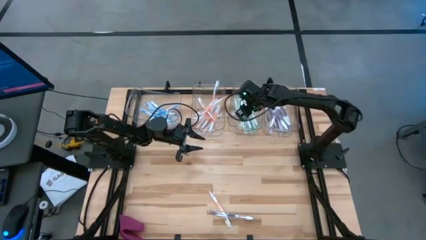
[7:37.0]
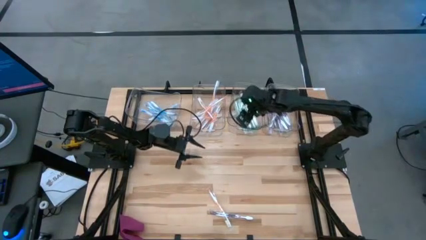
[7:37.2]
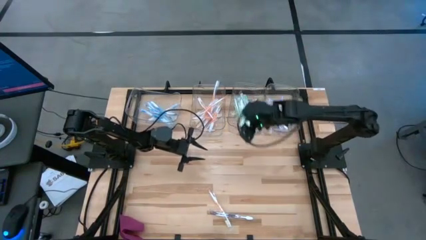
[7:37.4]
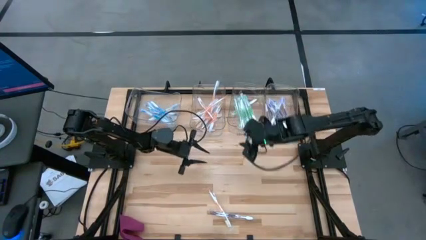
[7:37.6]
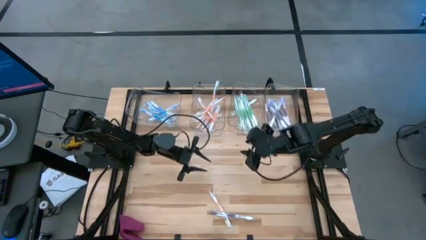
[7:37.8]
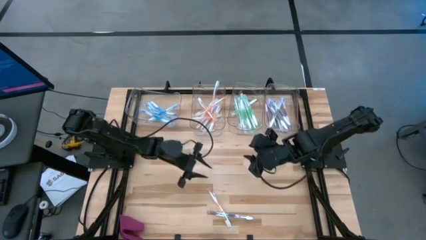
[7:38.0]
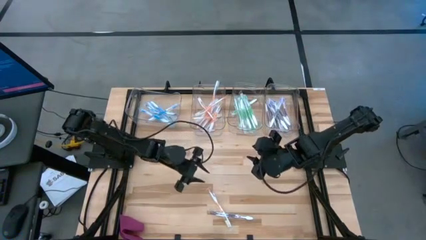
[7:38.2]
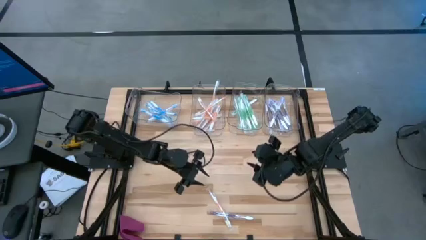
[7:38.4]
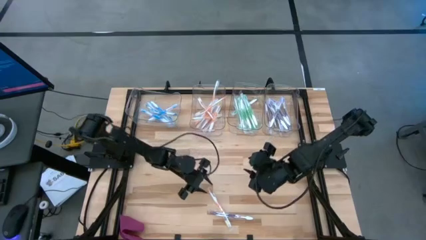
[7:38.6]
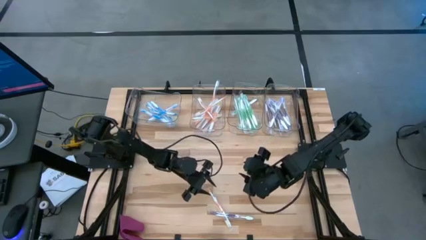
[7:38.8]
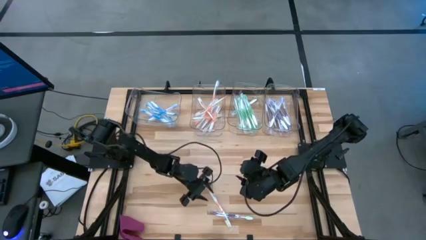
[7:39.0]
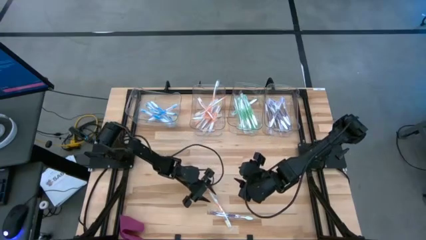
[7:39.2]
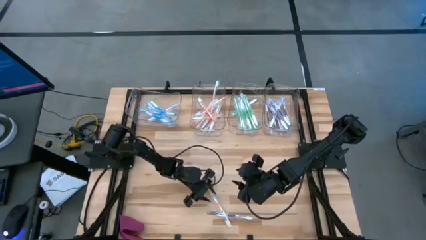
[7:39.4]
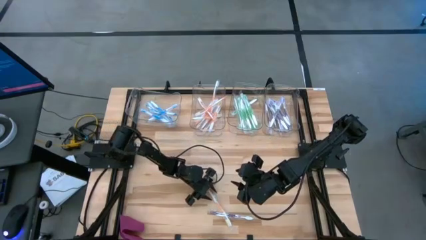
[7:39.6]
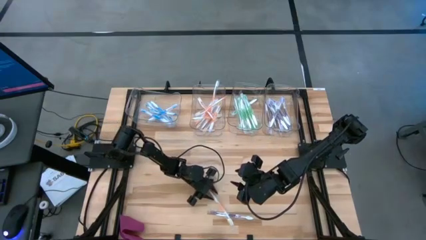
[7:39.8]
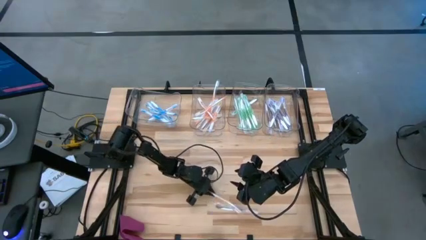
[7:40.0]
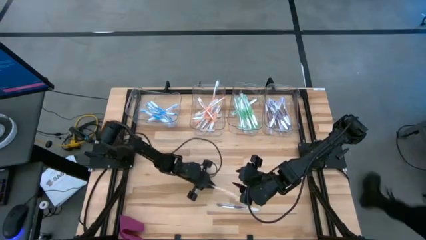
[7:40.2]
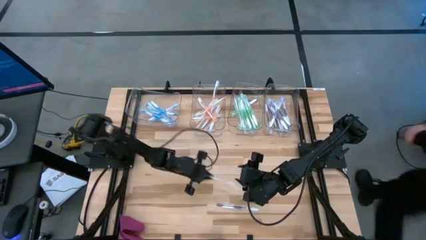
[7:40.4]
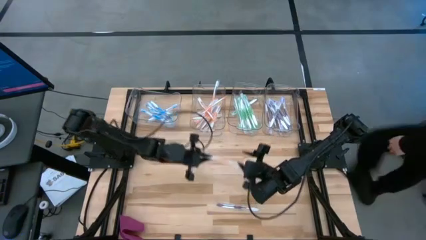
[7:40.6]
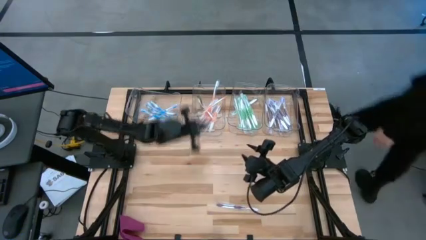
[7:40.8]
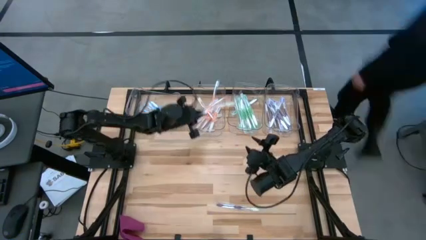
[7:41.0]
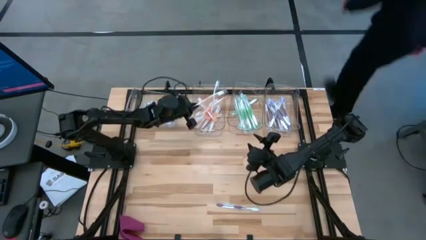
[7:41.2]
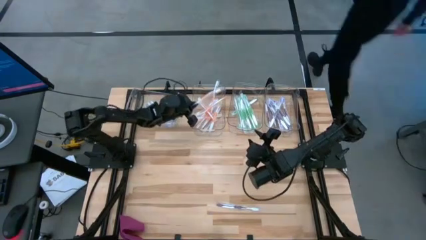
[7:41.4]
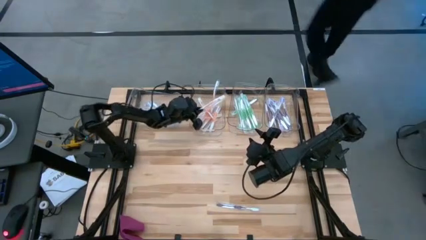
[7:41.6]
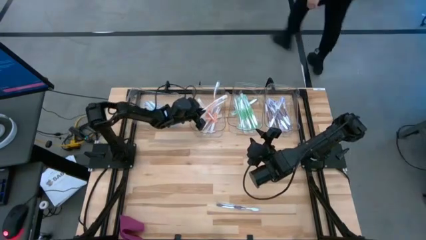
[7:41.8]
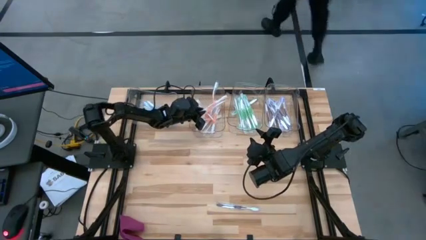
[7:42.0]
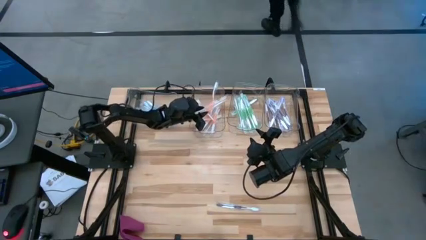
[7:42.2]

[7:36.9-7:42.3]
Task: Pick & Place Toothbrushes
Put the orange toothbrush into the middle left transparent bin

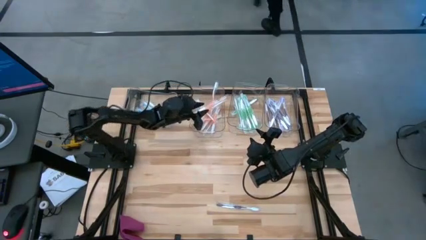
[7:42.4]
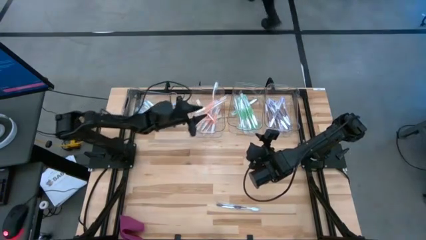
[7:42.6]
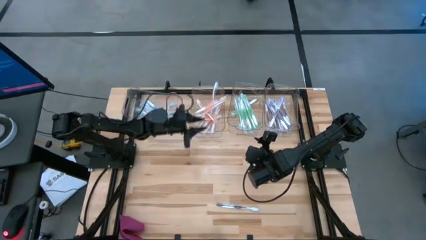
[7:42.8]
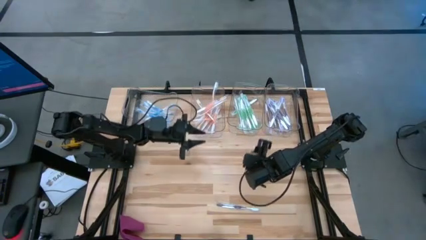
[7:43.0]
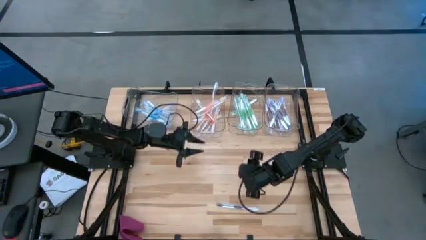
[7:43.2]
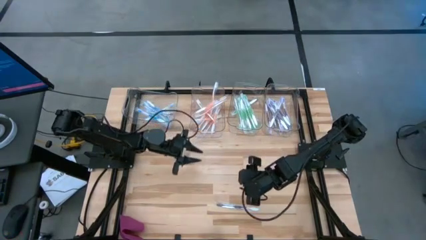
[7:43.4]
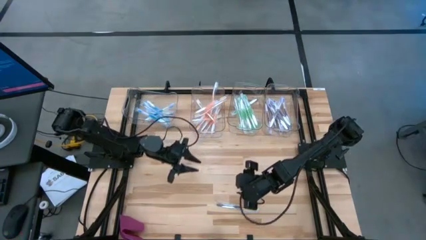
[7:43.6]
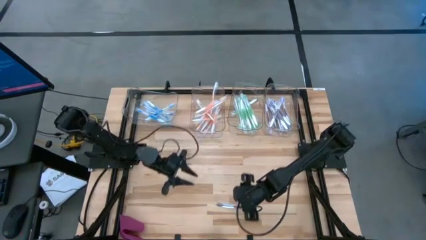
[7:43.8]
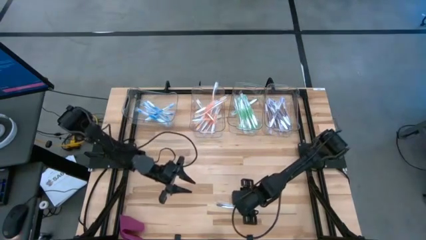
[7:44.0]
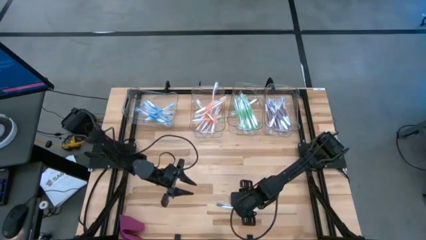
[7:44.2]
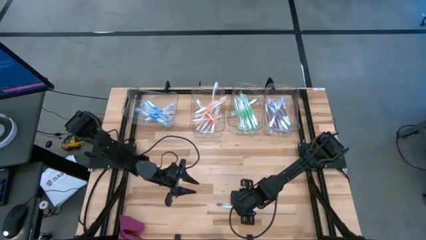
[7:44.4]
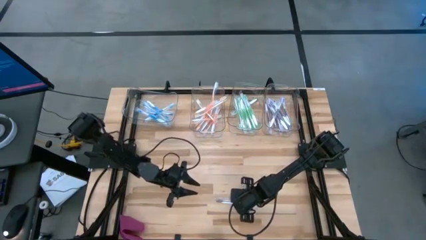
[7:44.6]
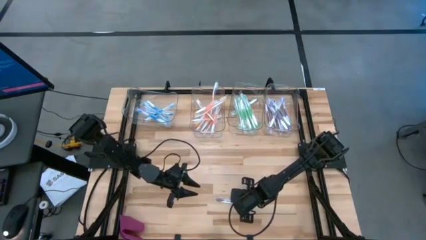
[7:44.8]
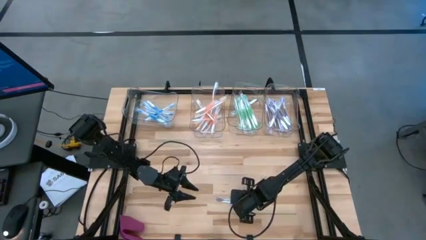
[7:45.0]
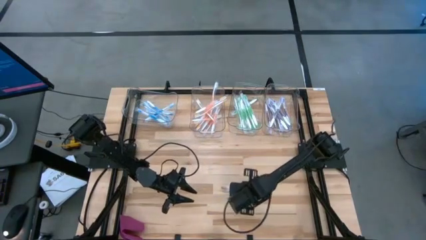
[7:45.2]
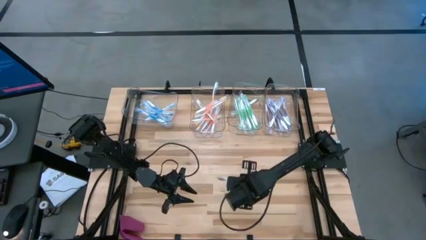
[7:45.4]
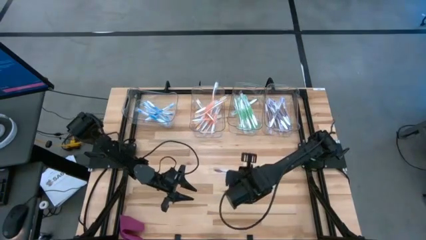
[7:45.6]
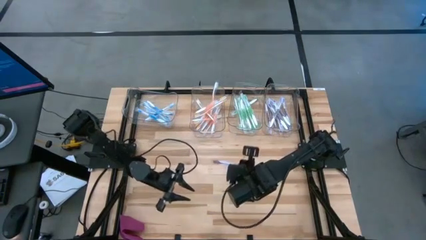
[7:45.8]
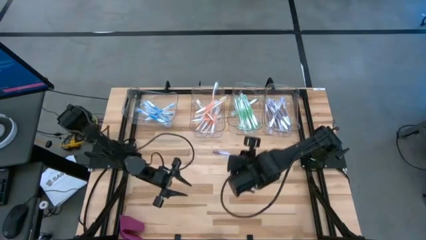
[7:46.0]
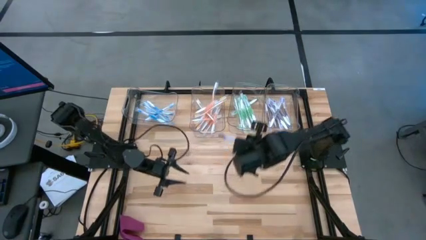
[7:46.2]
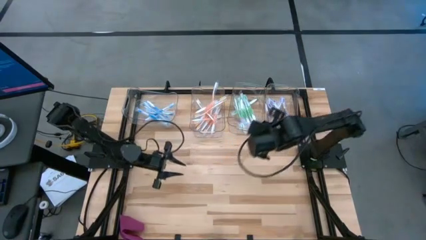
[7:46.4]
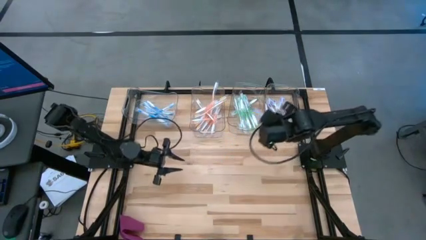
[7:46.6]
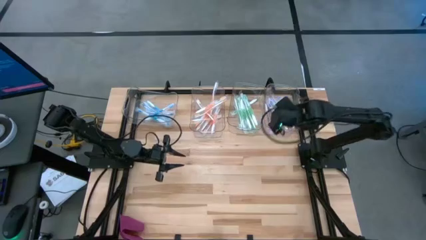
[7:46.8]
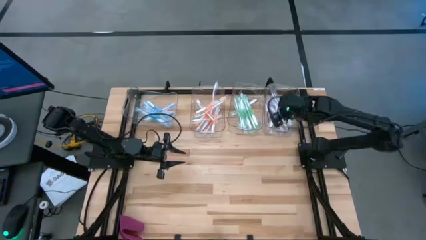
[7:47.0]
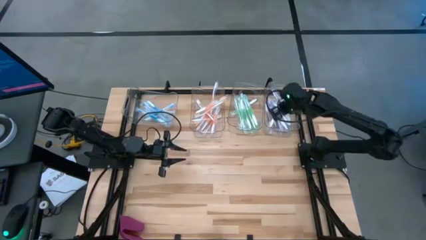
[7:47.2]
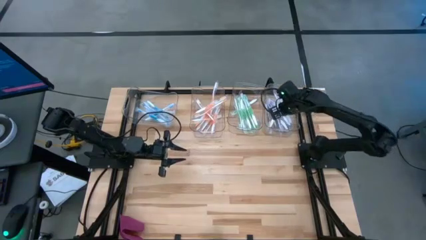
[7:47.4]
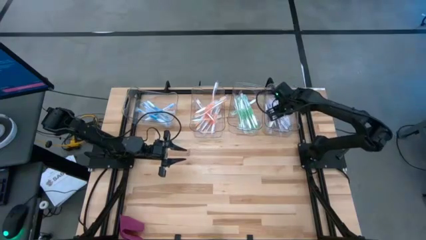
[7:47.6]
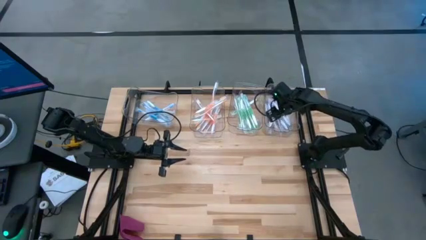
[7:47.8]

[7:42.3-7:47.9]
Put the violet toothbrush into the right transparent bin

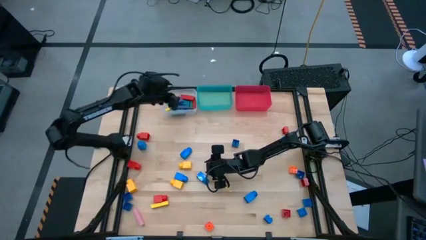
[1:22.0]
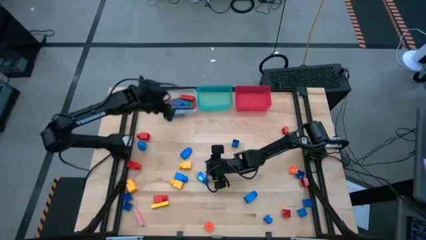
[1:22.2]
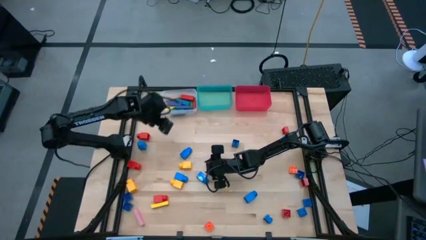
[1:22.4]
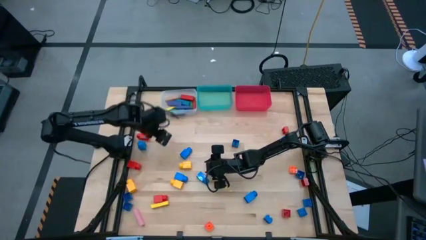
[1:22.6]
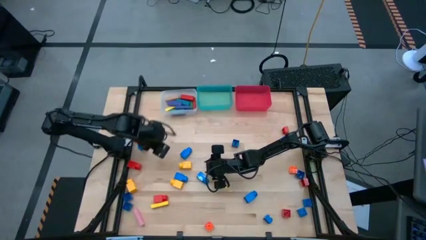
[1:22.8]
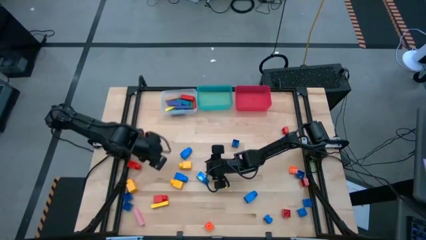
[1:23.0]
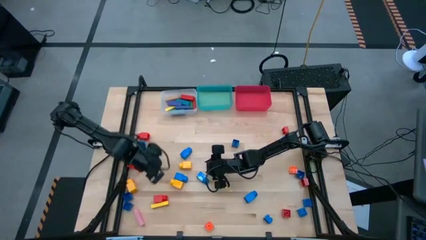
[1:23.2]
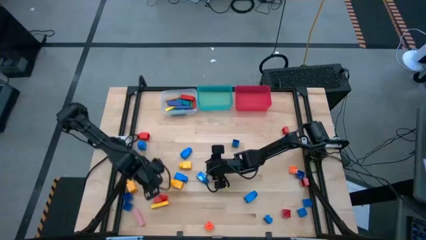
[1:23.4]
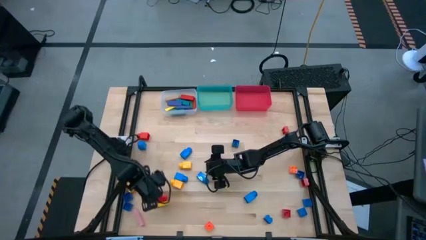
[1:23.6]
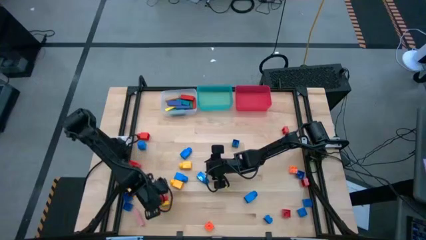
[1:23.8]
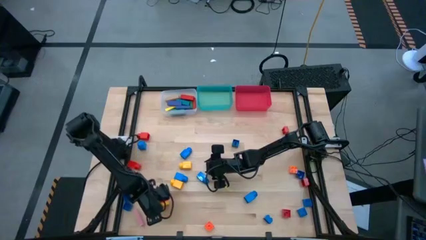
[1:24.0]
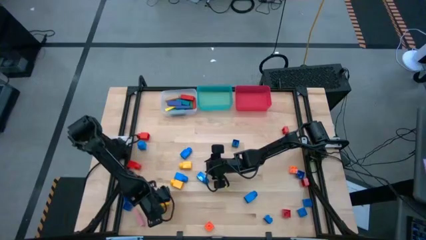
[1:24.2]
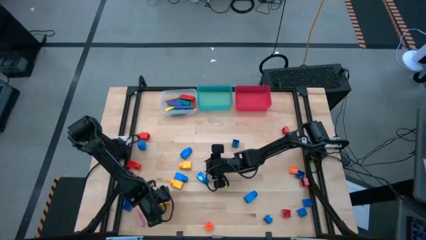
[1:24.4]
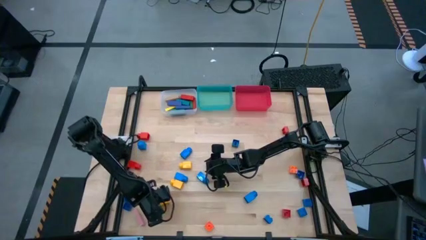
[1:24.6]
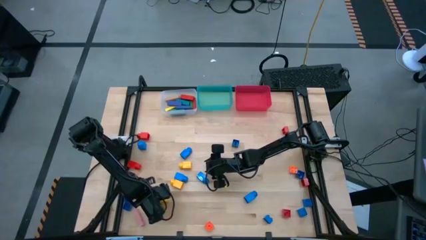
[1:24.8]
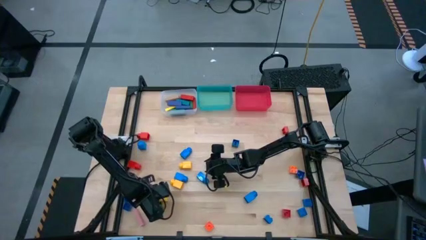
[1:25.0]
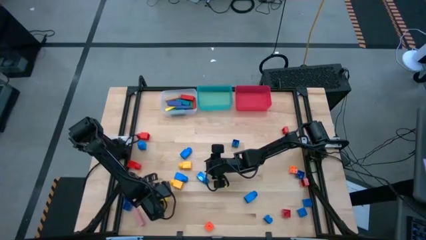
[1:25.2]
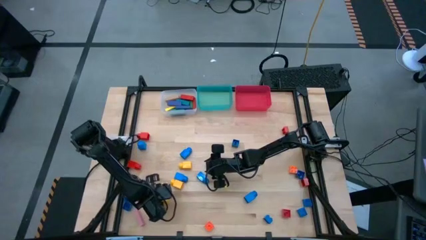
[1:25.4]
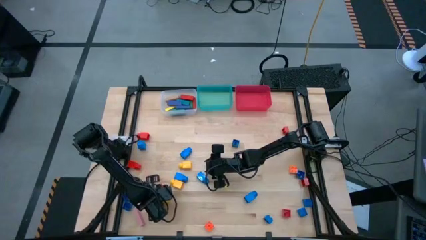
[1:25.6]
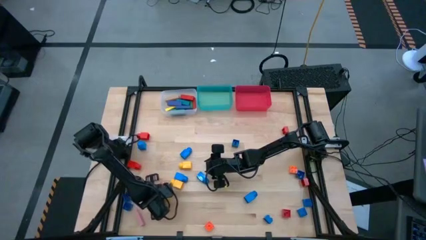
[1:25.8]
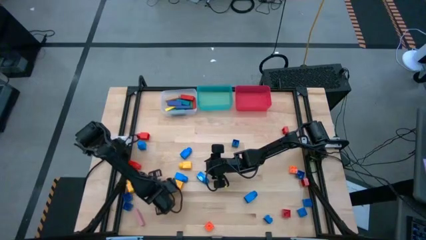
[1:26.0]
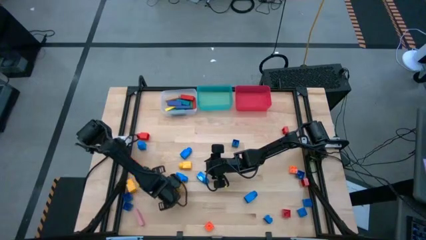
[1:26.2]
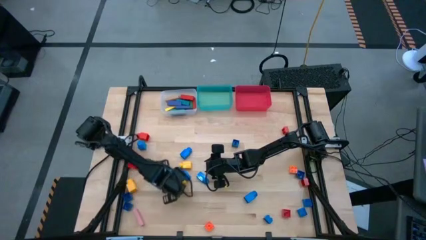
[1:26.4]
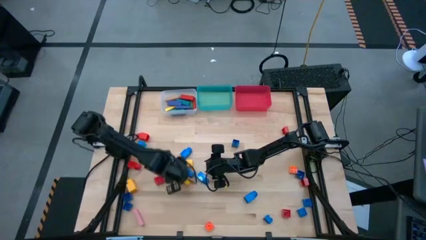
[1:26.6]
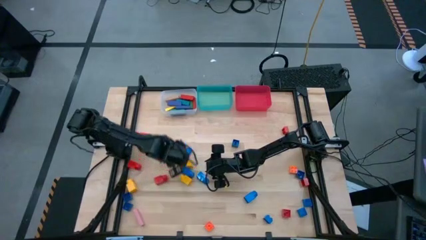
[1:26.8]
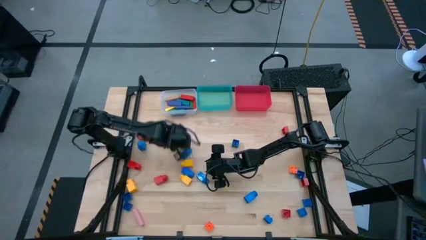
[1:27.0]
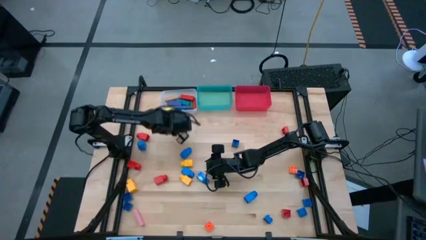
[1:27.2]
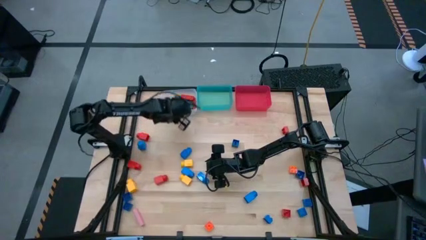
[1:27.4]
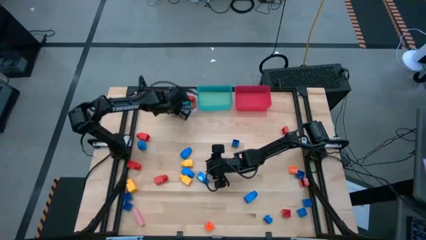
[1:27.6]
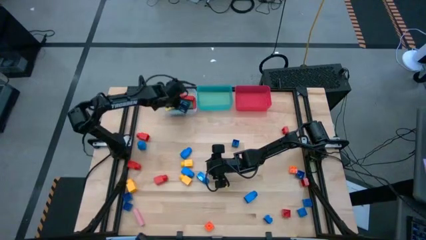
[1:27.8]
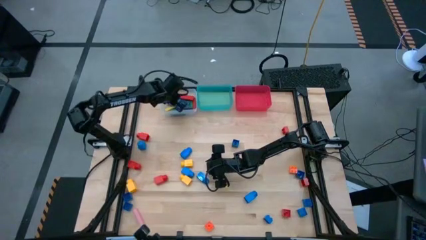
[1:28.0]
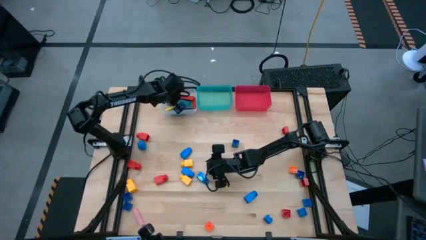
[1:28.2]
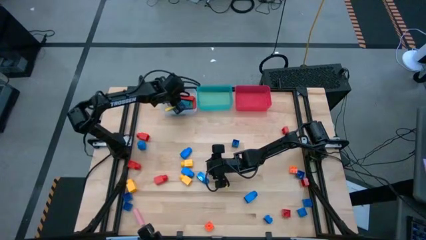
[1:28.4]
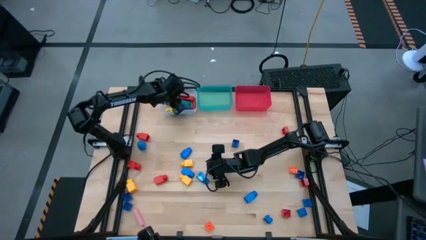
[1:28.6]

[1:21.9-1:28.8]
Task: Sort blocks by size
Put the yellow block into the transparent bin
